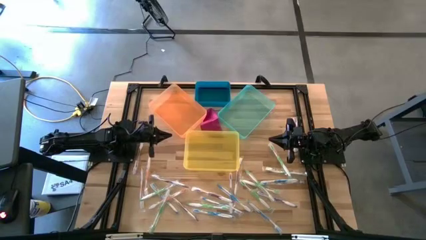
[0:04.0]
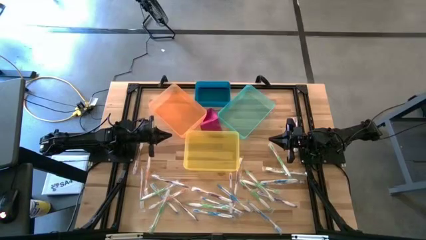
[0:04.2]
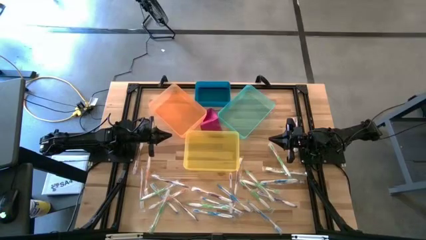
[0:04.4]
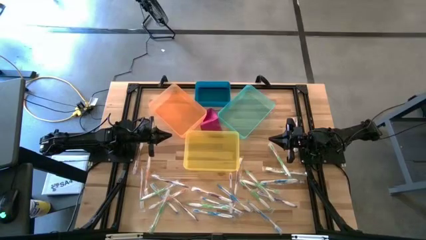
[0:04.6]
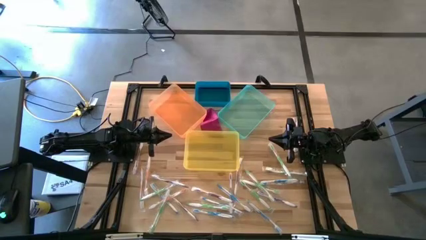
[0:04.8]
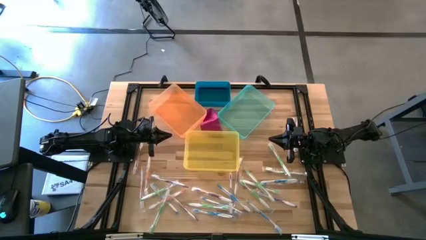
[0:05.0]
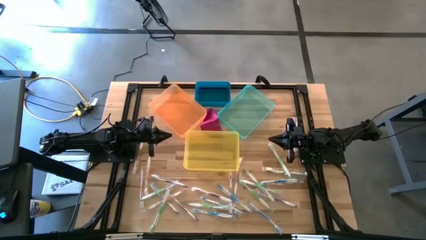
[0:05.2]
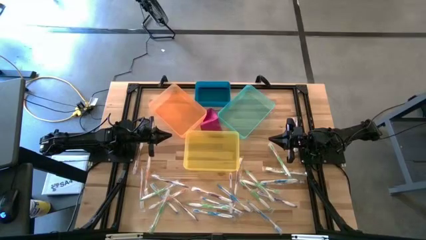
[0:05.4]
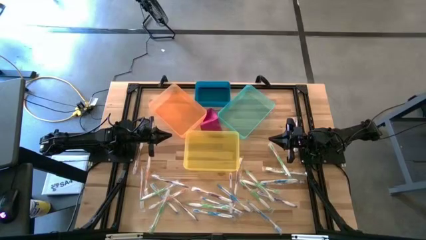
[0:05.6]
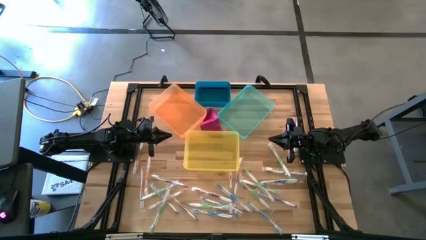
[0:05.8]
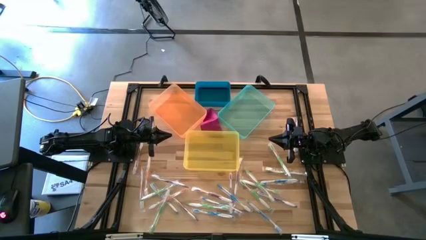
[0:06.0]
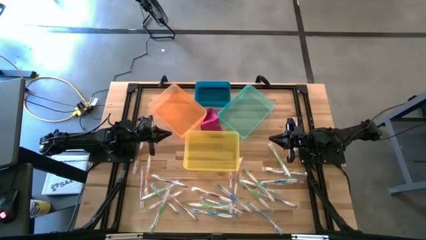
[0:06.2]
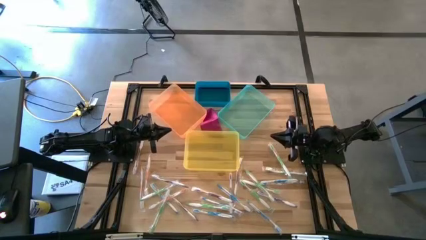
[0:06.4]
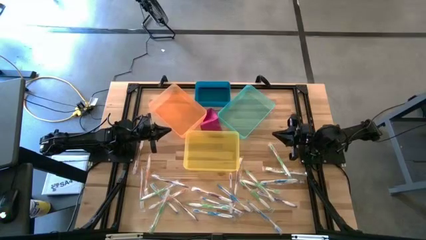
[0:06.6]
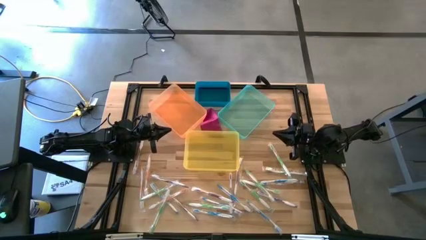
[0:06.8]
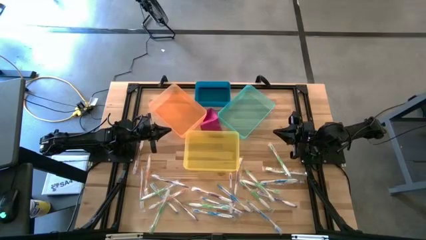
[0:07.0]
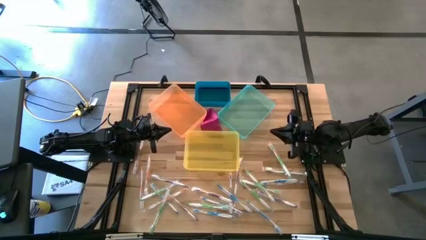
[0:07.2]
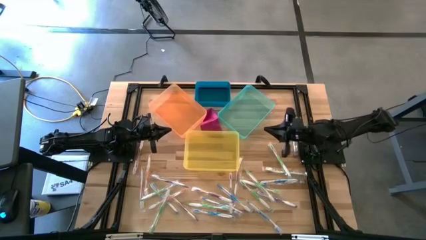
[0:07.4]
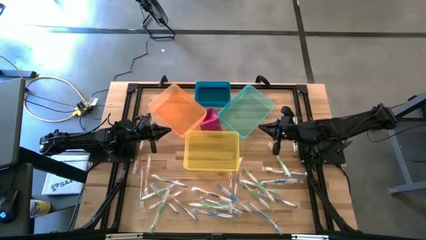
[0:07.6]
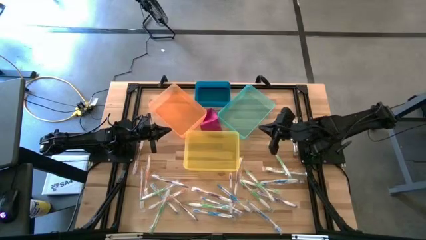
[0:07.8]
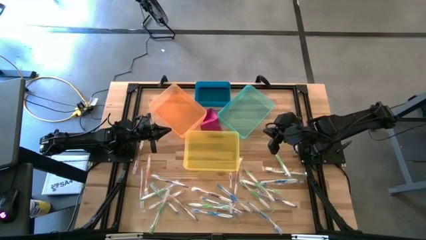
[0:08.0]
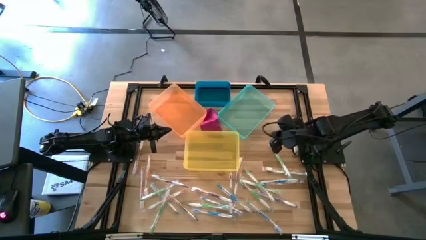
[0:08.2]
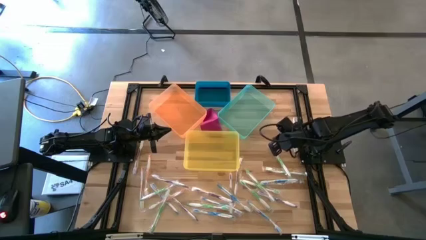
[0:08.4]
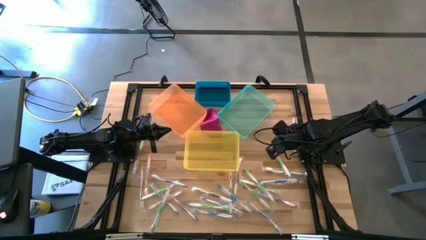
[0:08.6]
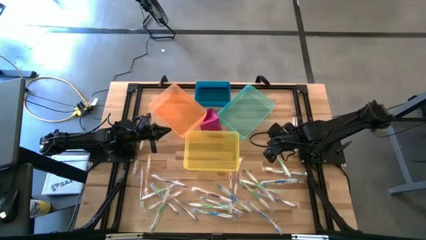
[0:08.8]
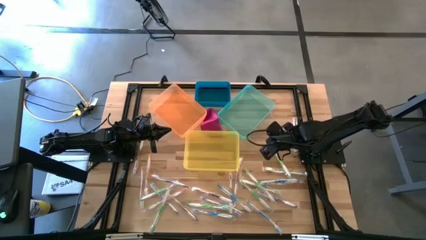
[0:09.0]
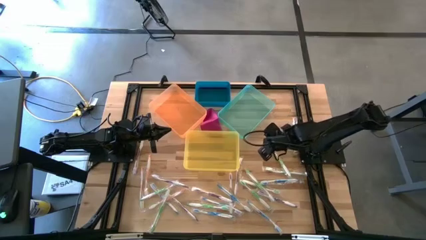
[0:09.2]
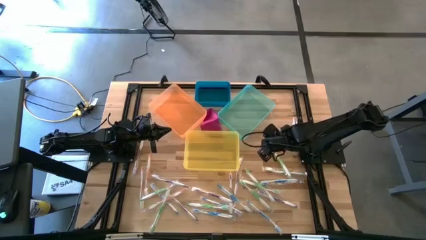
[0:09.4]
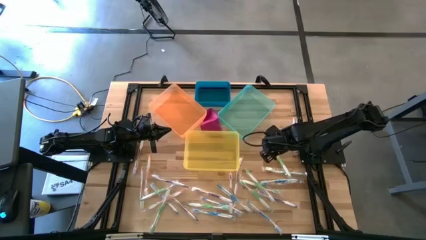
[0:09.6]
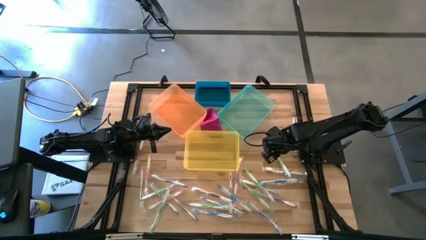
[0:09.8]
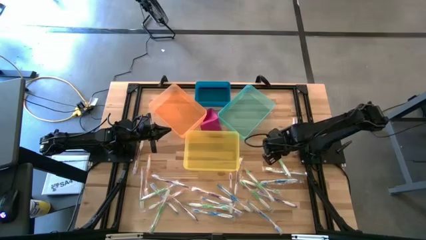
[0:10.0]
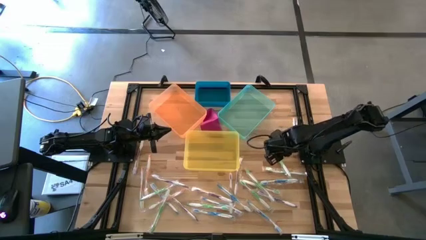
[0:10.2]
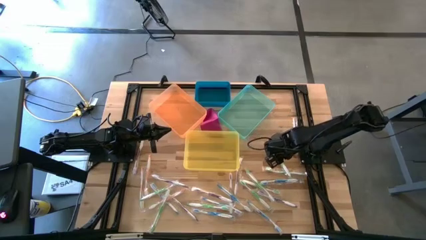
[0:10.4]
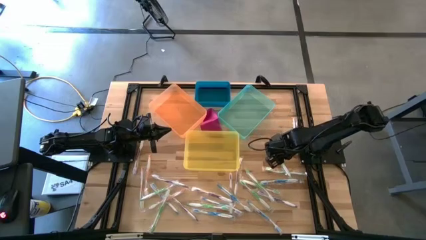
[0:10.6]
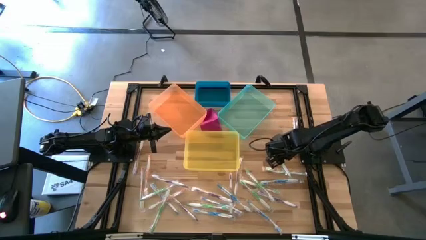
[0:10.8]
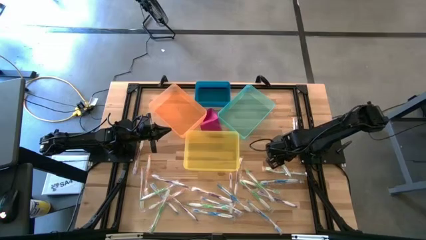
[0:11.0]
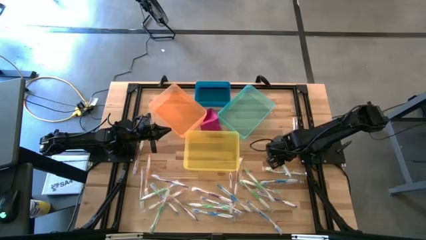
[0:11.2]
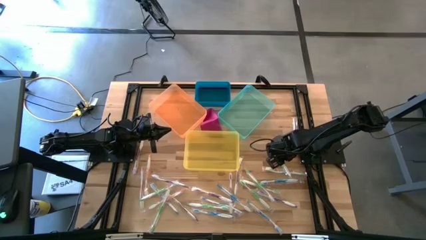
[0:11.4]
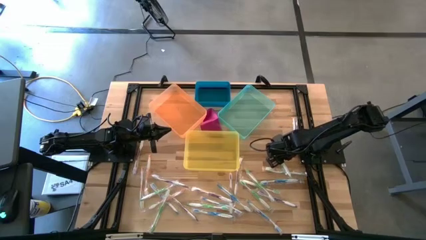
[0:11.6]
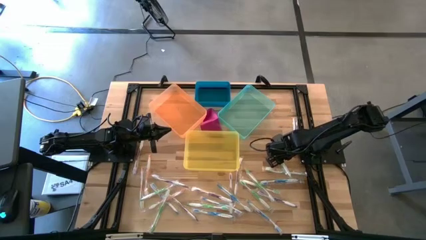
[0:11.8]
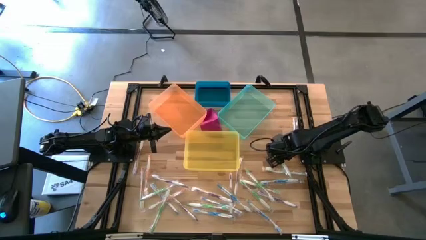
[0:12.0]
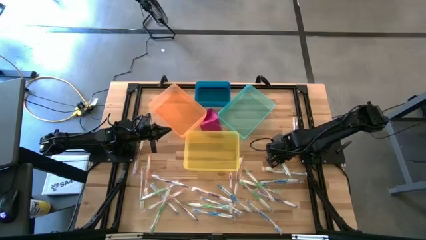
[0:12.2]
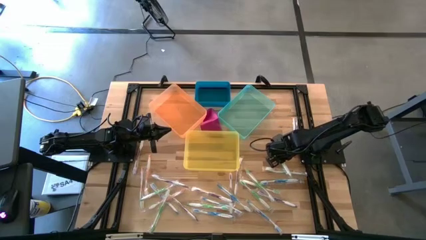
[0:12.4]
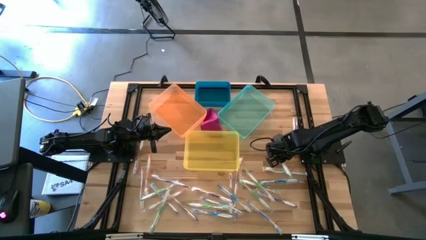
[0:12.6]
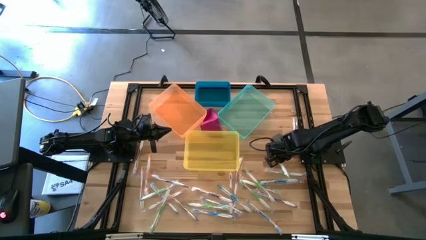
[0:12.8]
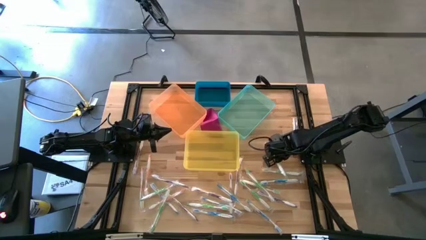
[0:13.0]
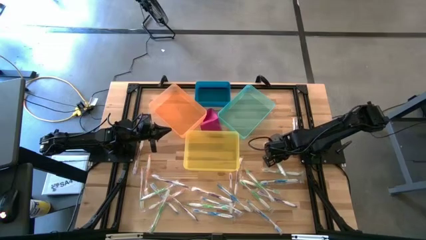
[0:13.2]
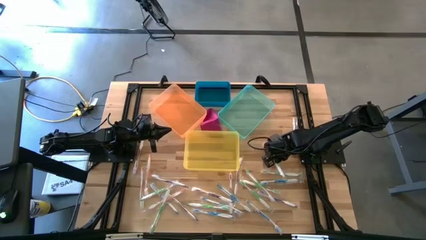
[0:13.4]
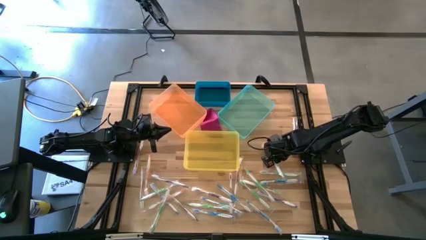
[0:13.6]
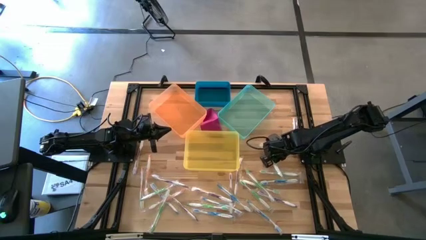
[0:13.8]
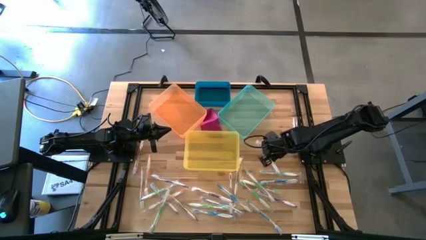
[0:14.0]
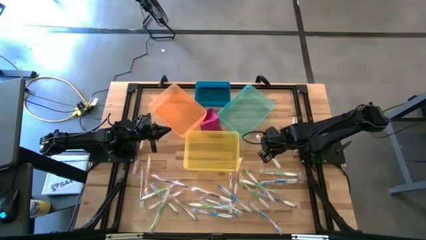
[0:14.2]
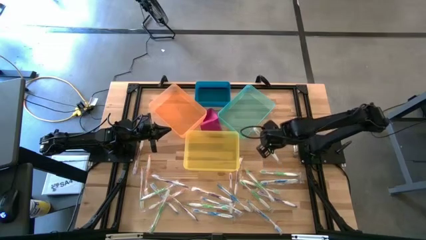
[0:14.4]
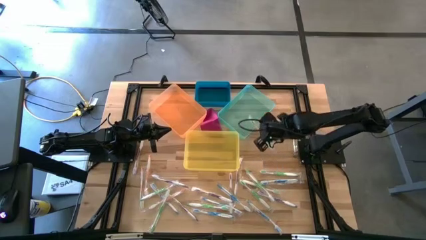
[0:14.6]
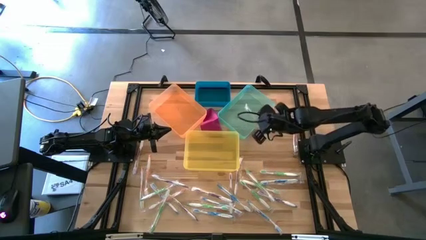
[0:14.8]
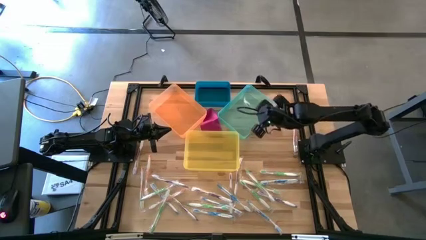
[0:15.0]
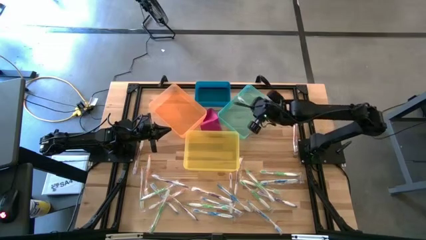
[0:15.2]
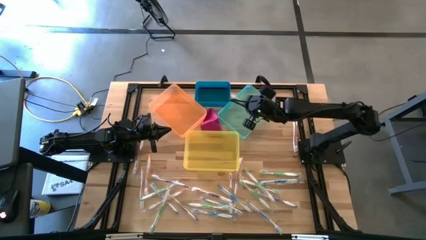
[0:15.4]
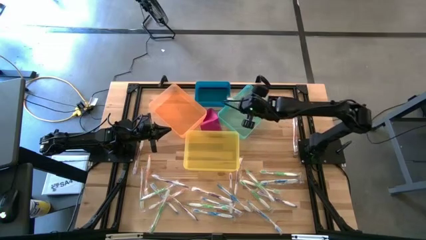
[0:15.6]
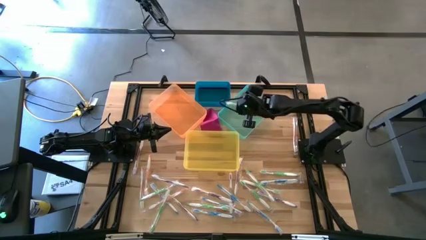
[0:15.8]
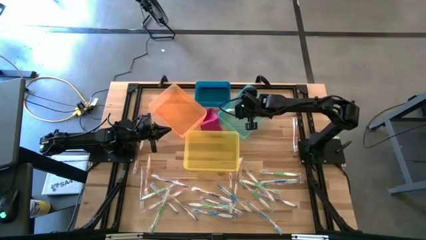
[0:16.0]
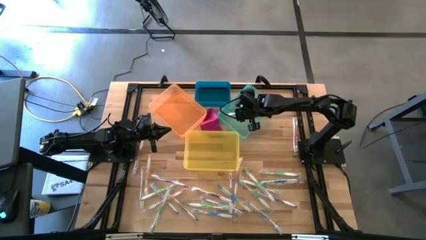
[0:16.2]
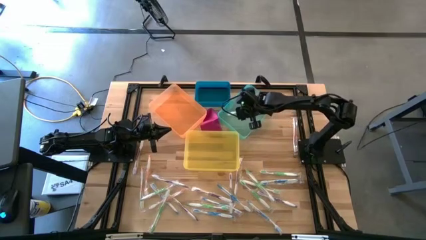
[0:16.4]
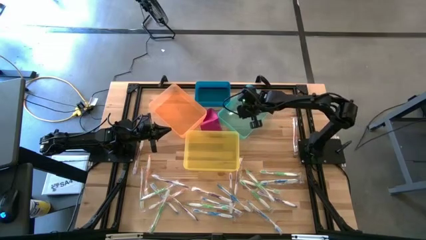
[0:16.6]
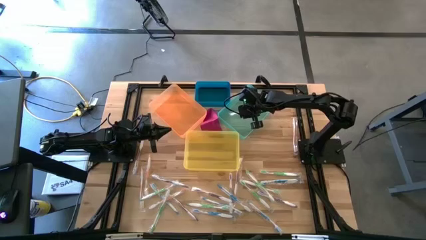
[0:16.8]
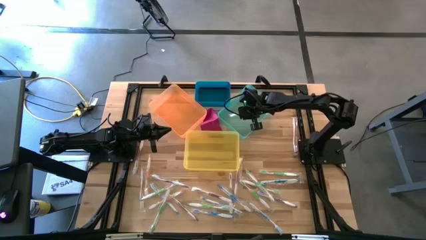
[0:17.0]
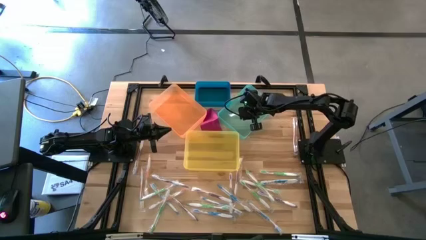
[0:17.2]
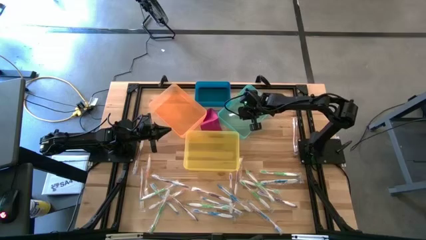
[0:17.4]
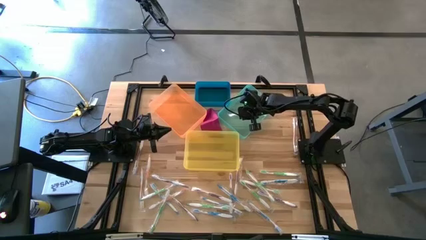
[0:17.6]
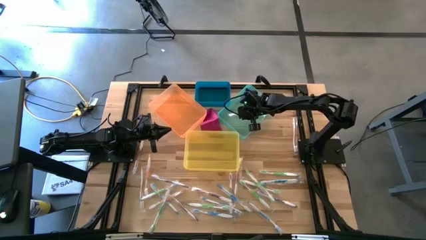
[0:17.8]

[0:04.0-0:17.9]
Task: Pick & Place Toothbrushes
Put the green toothbrush into the green bin
